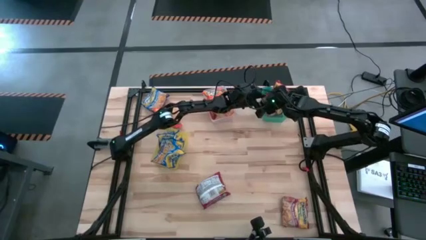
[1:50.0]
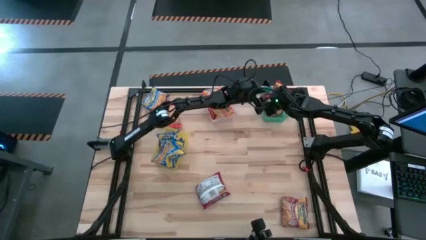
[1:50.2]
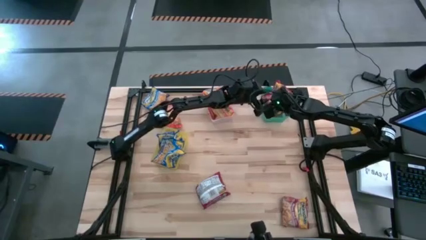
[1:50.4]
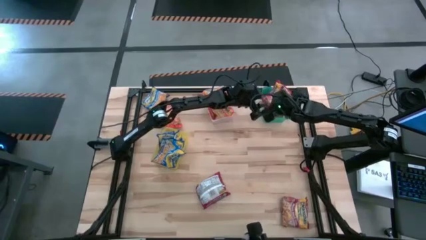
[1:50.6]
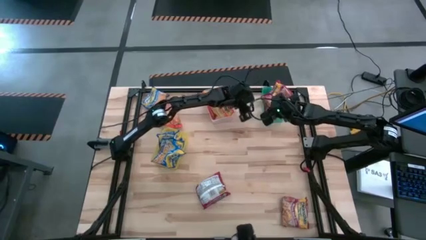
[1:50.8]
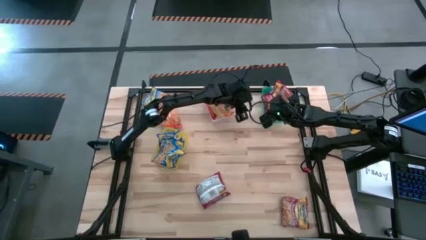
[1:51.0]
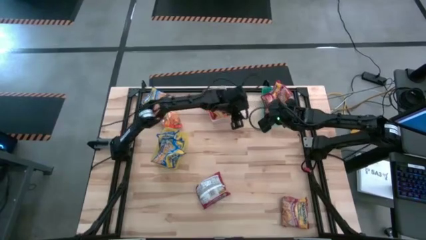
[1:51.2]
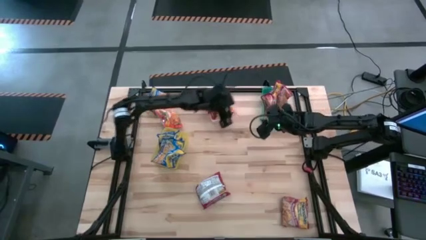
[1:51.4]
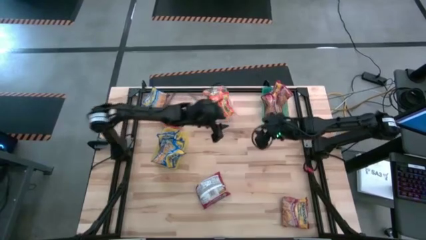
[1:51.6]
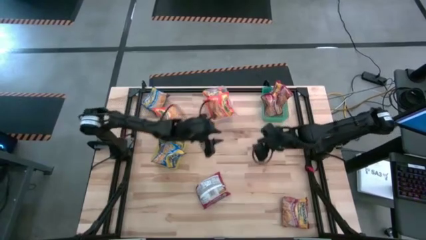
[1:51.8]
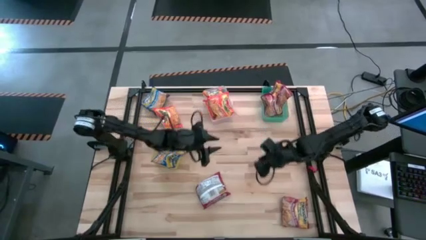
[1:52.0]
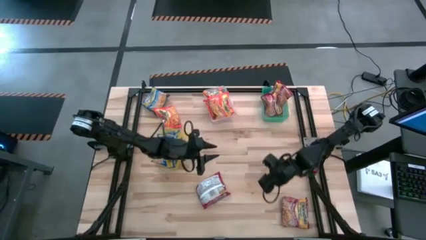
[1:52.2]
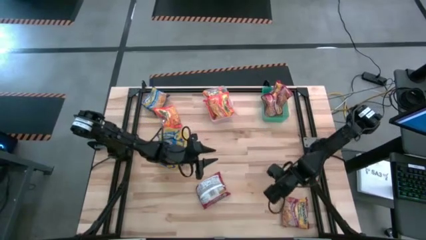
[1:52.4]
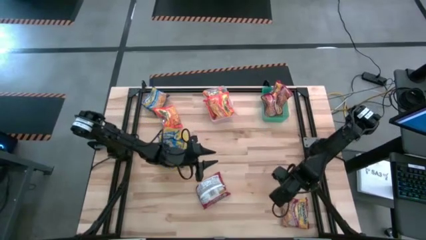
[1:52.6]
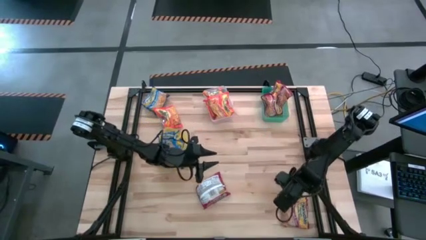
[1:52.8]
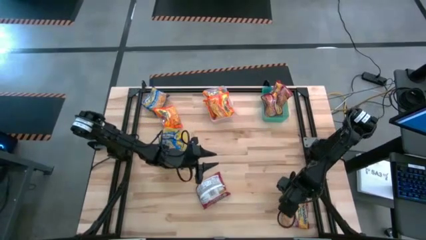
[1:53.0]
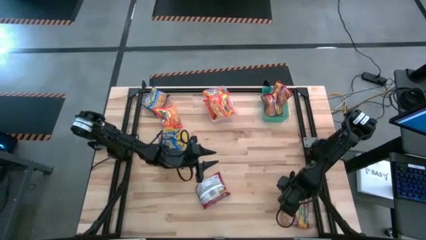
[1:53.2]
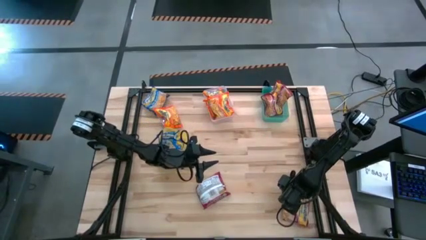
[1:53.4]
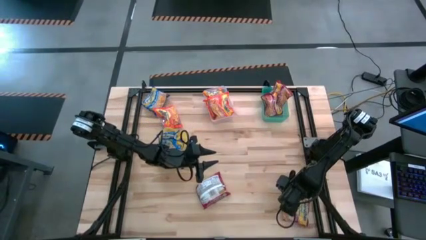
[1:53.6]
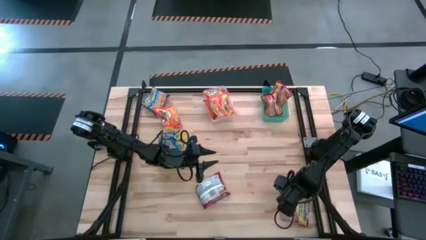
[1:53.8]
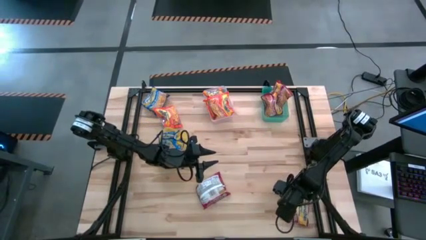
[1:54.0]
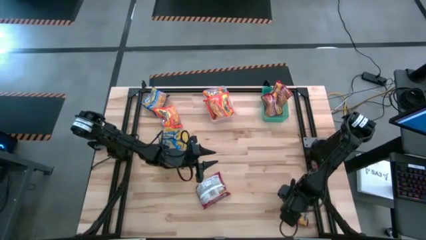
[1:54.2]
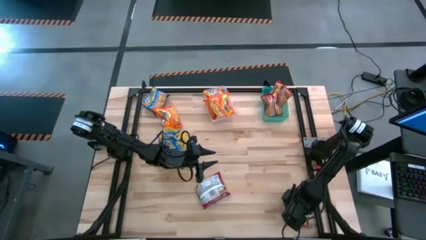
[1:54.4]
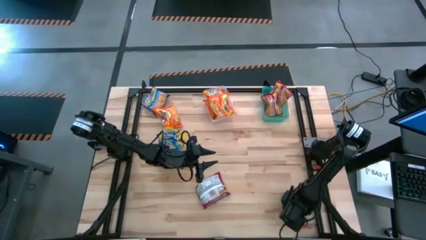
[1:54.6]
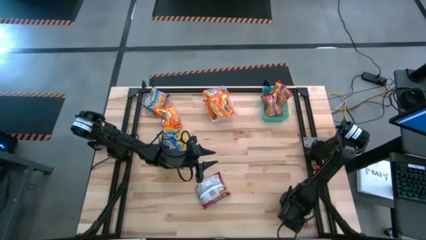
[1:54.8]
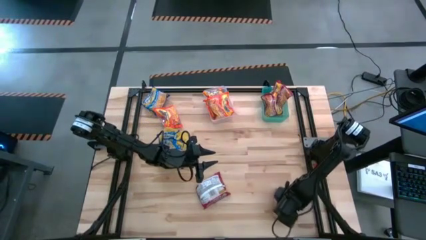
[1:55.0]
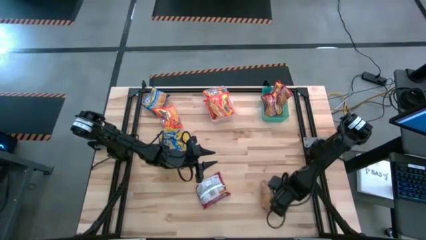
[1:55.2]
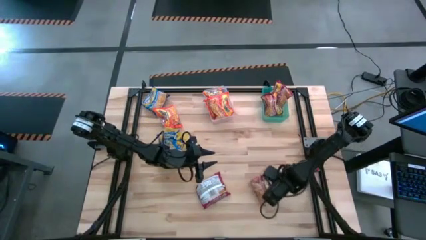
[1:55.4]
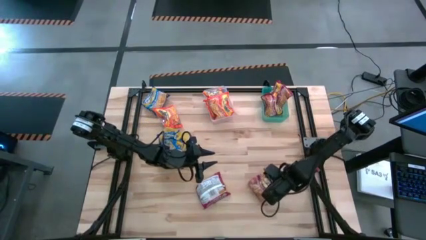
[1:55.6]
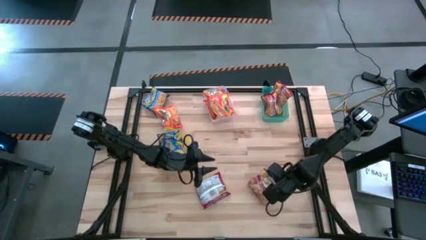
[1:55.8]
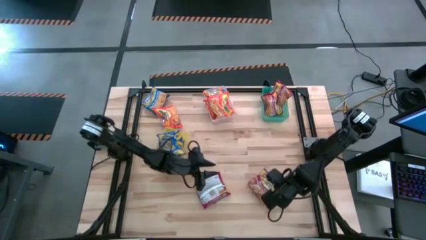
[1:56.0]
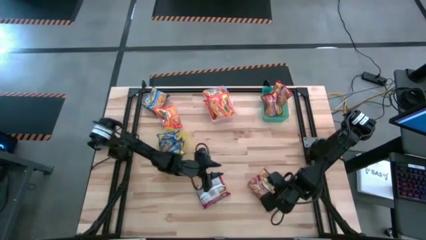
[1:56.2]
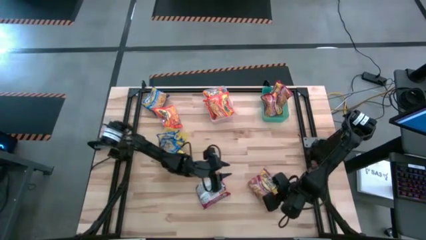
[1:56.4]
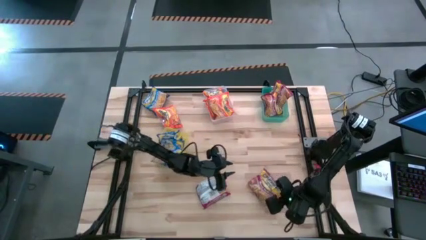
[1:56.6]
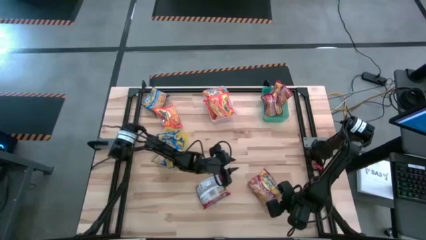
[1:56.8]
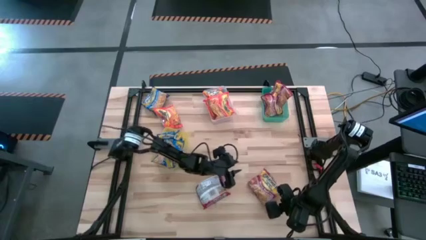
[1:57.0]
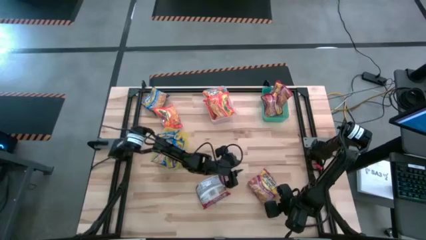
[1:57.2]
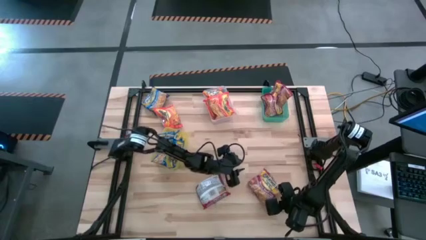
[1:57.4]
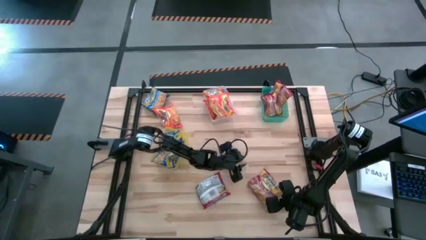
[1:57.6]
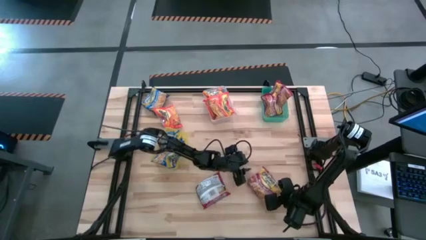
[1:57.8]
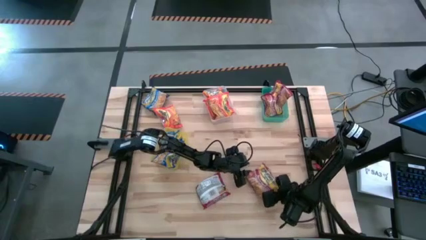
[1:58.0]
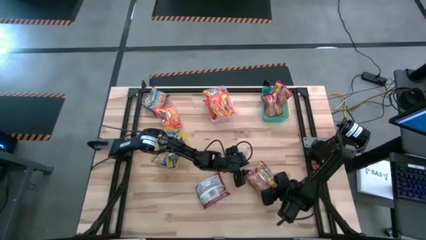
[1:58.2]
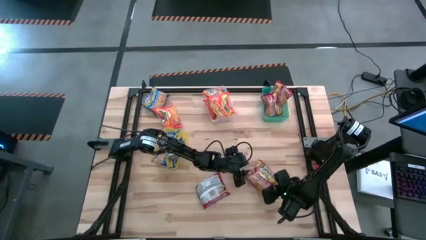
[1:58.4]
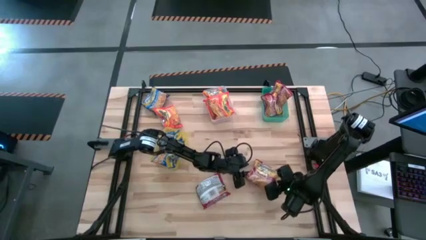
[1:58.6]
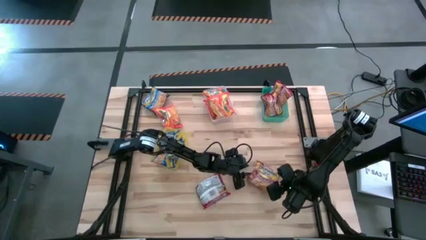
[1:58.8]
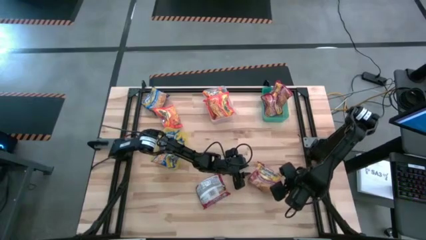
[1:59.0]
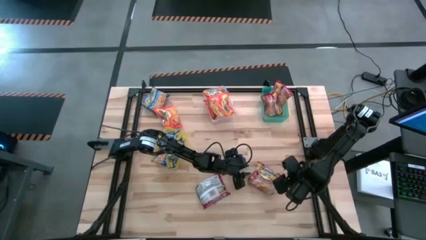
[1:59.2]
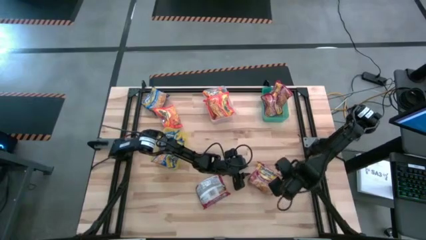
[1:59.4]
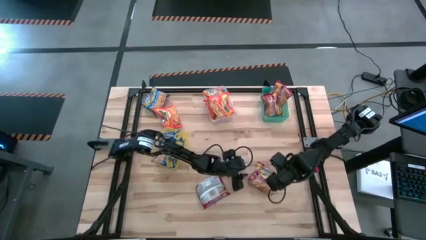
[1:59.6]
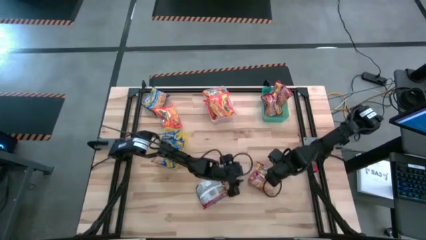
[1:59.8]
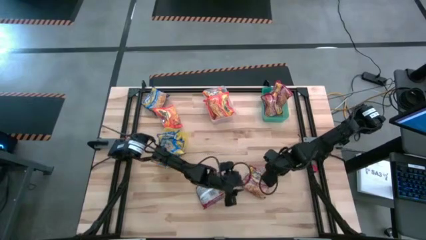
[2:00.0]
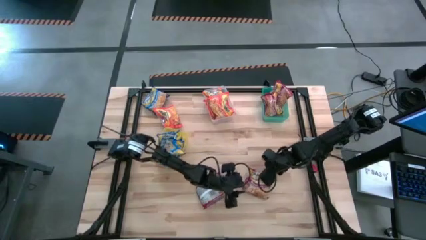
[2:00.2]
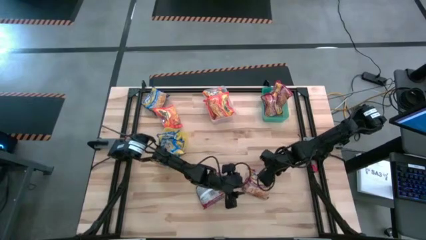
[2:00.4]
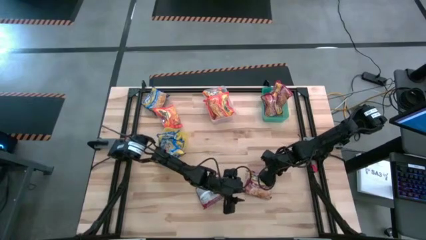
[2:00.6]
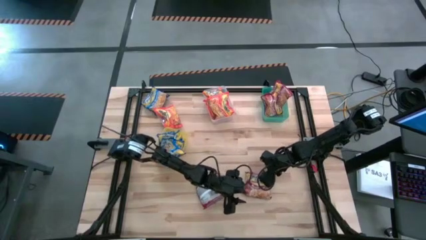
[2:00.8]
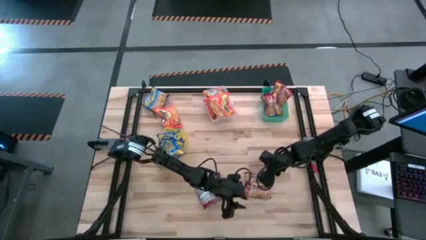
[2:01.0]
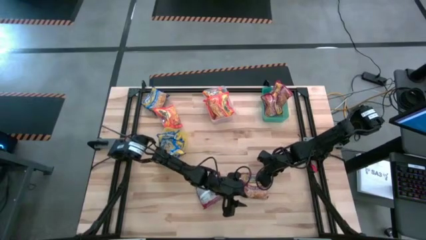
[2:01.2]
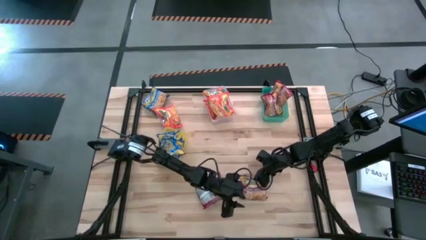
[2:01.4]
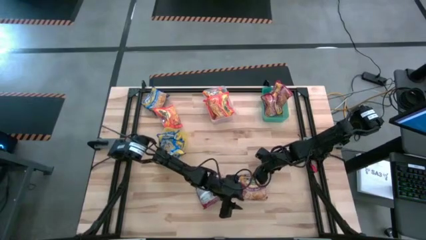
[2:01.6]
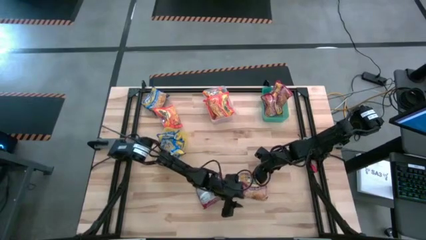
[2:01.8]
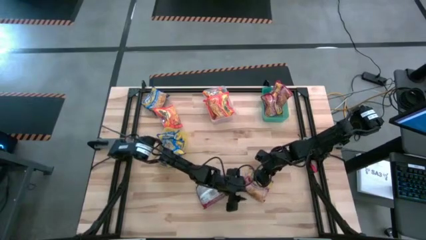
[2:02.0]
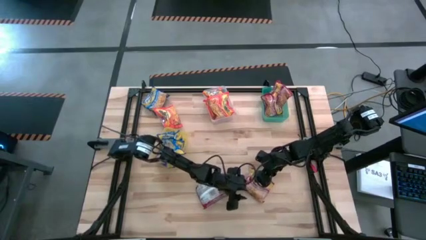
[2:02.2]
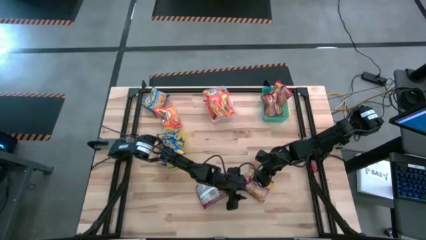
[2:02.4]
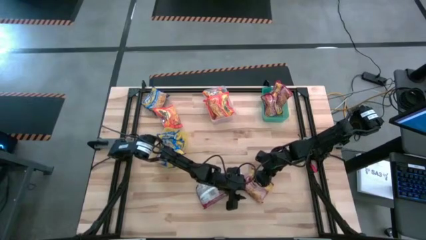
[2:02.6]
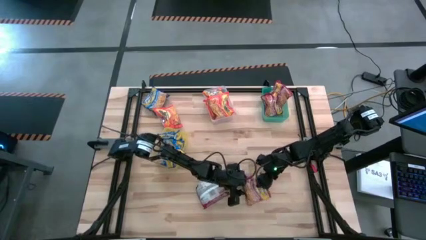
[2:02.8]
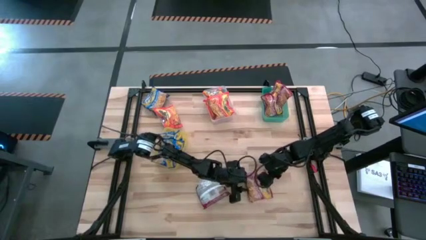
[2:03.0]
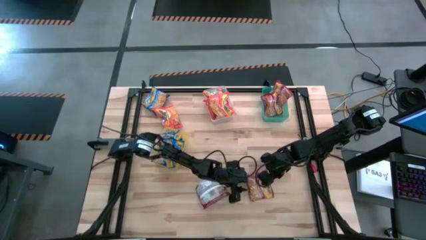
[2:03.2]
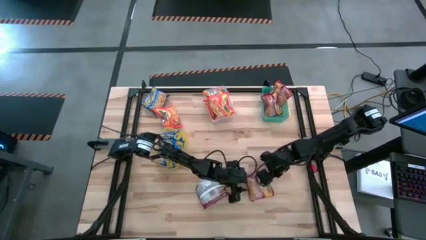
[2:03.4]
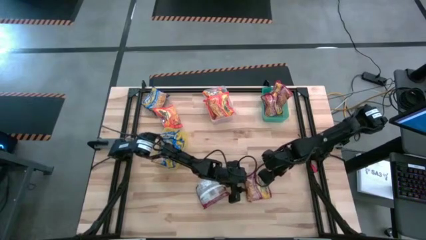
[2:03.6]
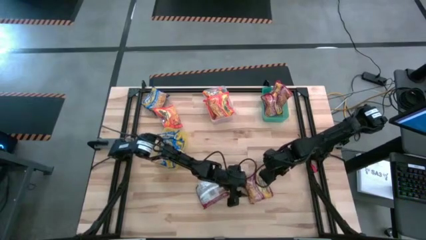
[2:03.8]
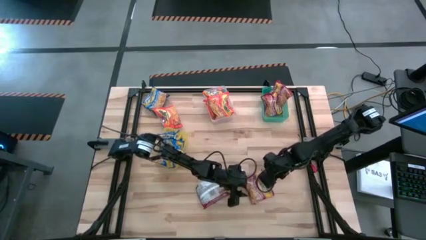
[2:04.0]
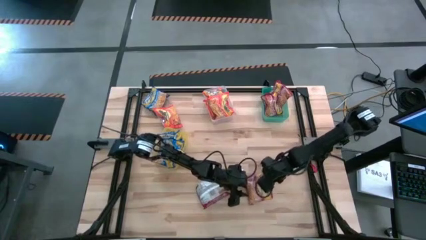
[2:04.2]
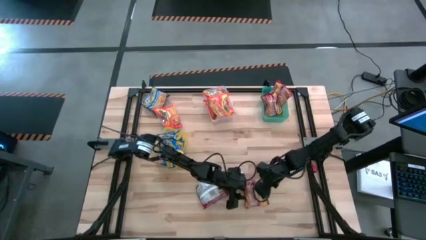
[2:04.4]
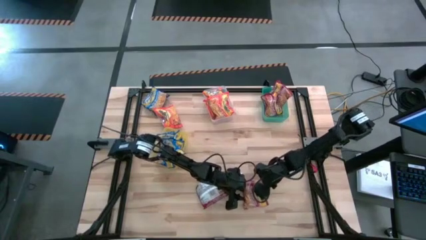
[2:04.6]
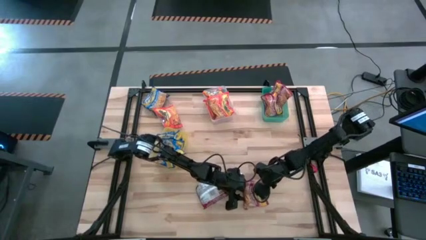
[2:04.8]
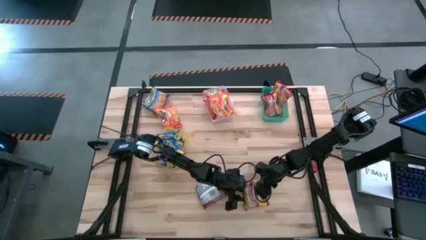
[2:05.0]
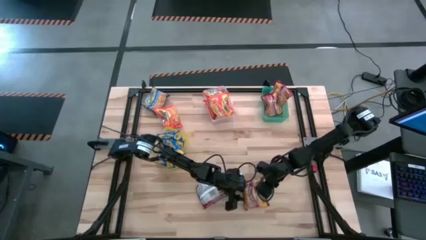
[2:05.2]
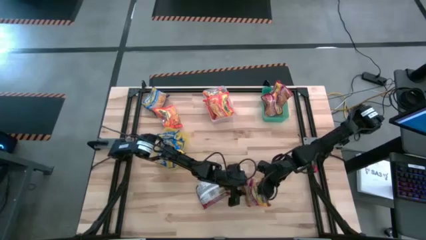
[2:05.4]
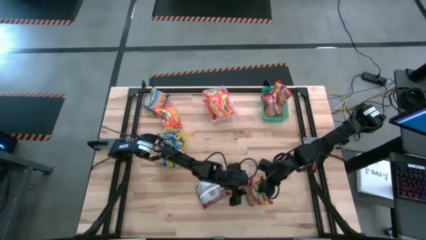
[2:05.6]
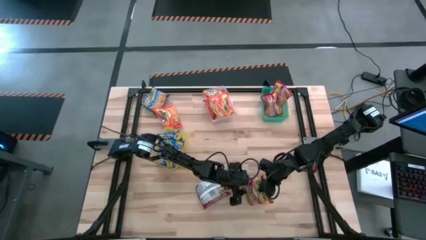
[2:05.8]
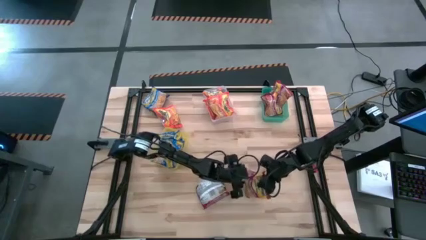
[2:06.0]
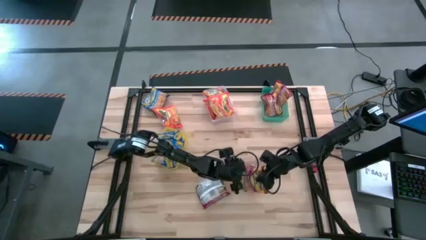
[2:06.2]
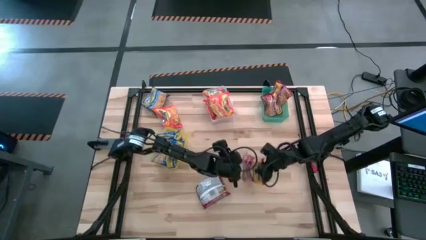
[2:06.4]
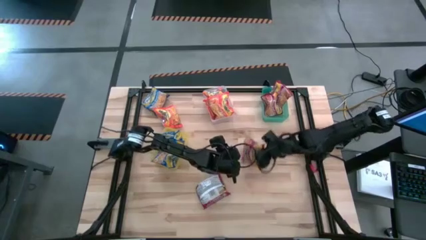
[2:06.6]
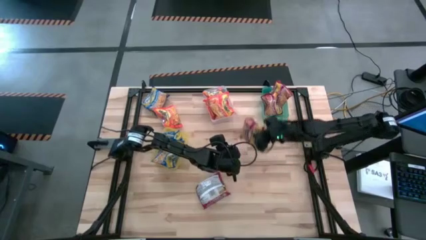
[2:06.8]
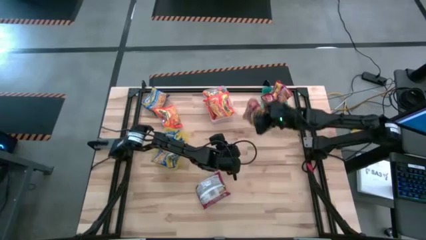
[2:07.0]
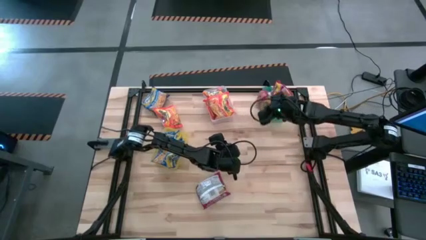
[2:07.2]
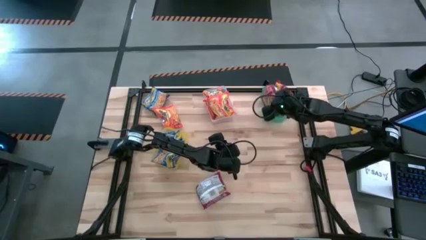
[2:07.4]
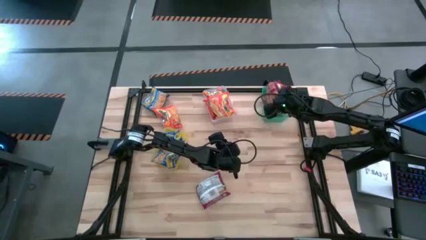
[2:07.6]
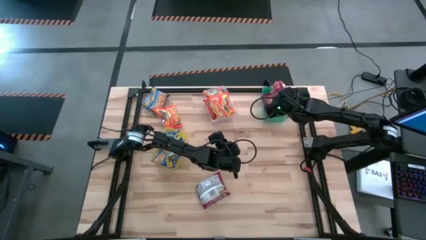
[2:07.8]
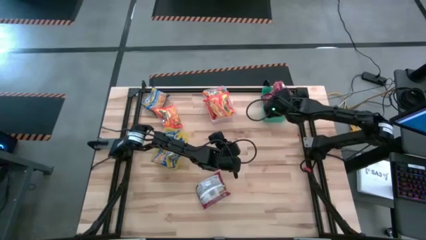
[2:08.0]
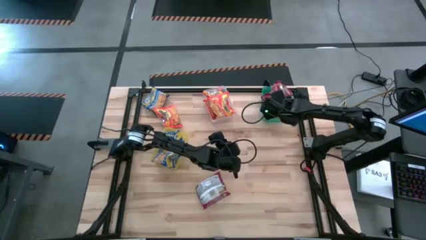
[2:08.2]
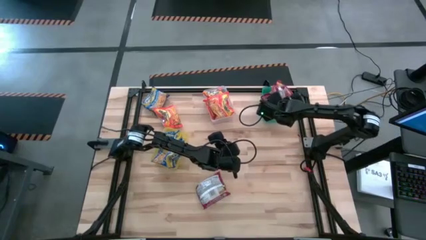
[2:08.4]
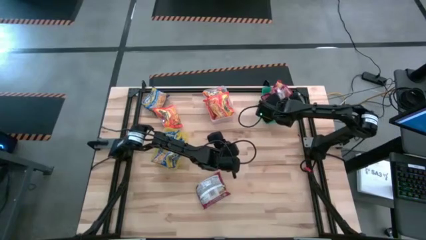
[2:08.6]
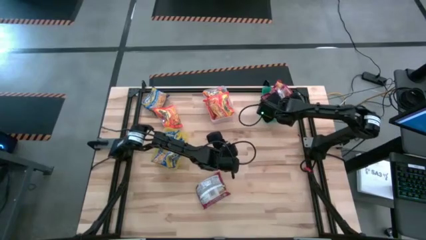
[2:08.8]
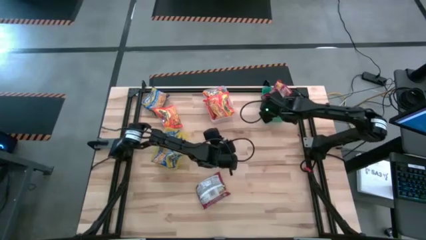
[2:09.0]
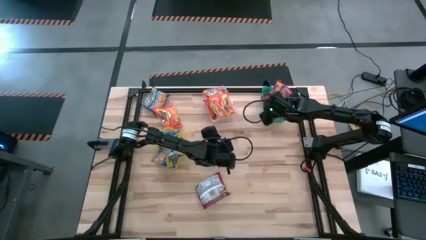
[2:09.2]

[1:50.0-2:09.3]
Task: Sort Maruchan noodles
Put the red noodle pack into the green bin
